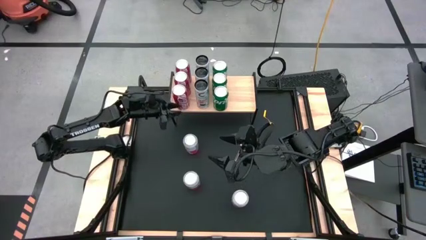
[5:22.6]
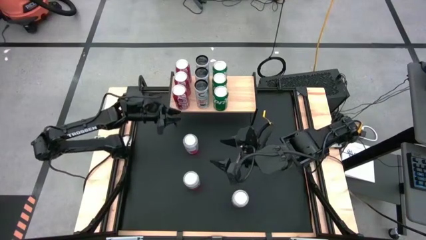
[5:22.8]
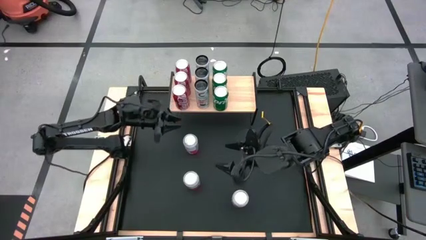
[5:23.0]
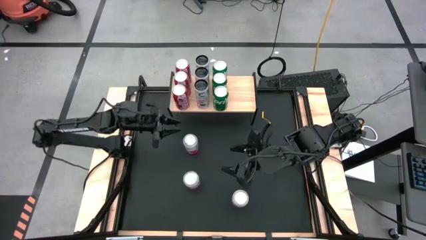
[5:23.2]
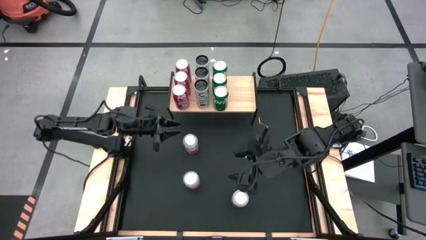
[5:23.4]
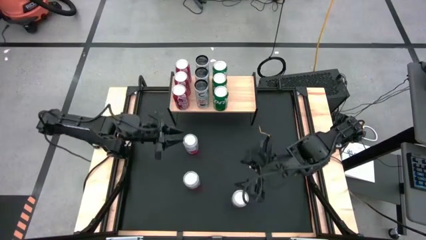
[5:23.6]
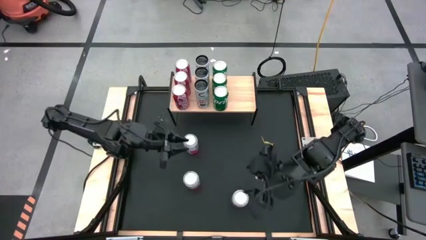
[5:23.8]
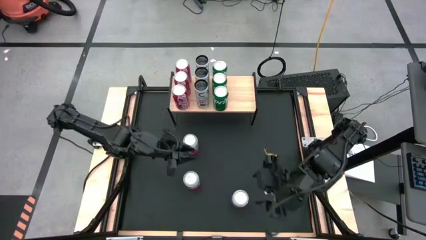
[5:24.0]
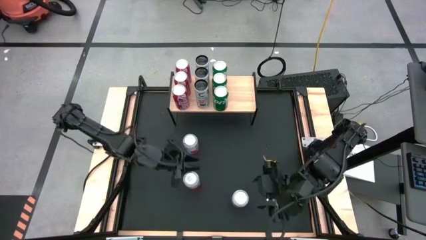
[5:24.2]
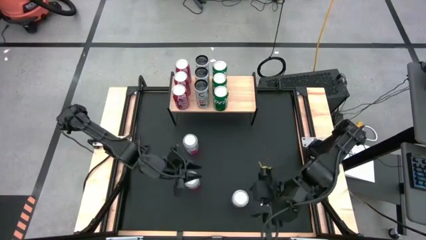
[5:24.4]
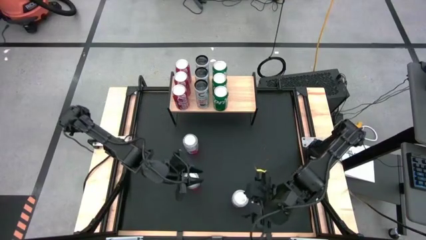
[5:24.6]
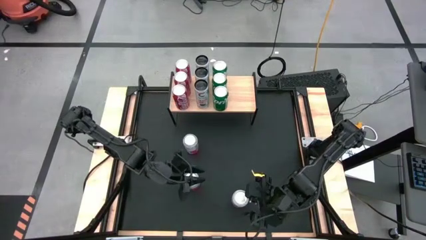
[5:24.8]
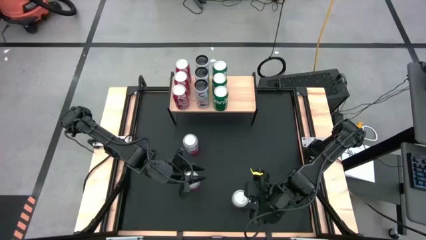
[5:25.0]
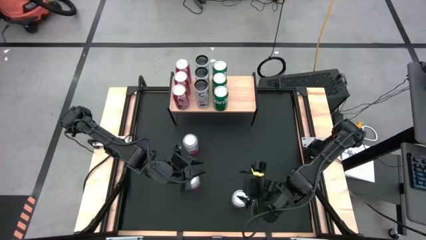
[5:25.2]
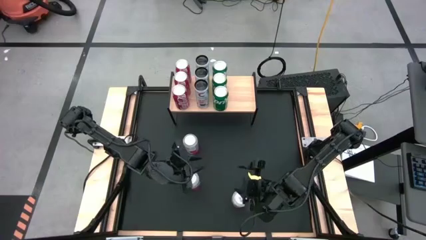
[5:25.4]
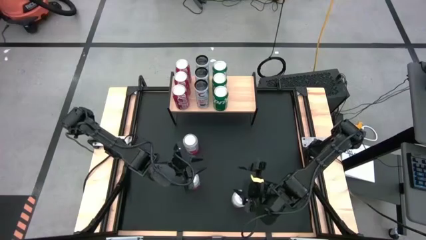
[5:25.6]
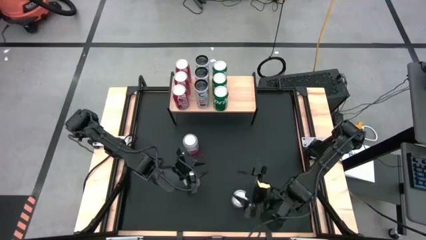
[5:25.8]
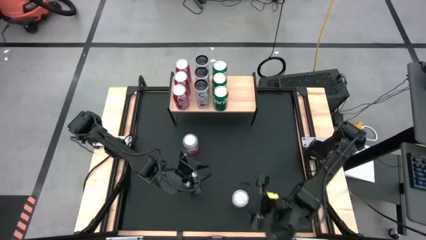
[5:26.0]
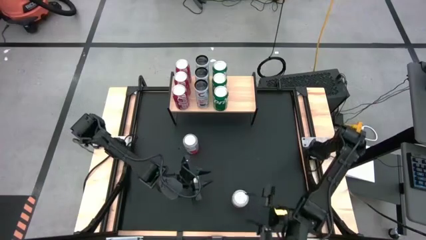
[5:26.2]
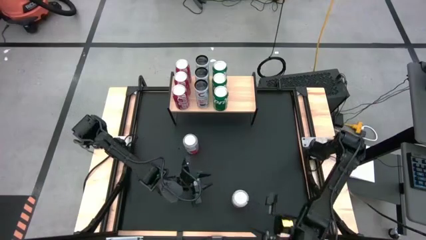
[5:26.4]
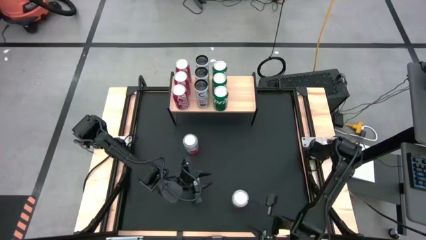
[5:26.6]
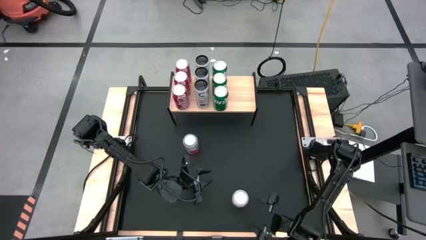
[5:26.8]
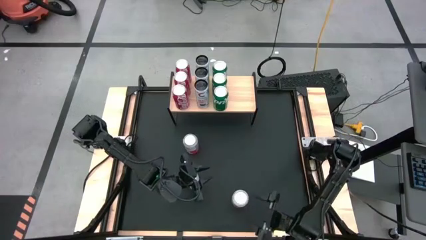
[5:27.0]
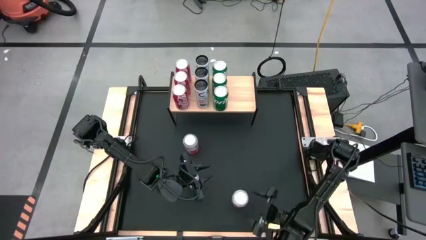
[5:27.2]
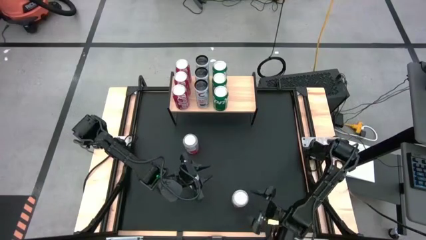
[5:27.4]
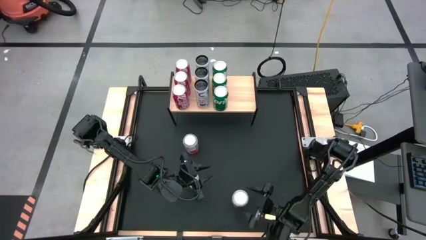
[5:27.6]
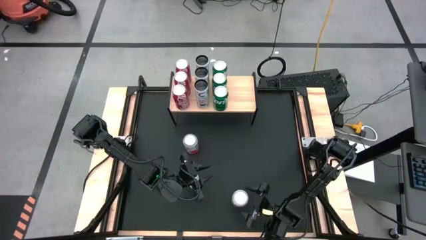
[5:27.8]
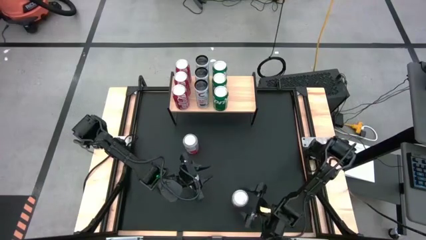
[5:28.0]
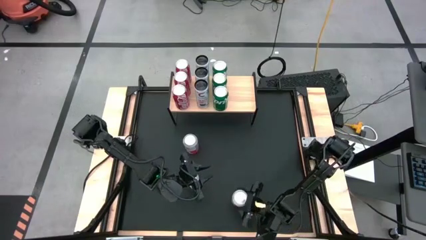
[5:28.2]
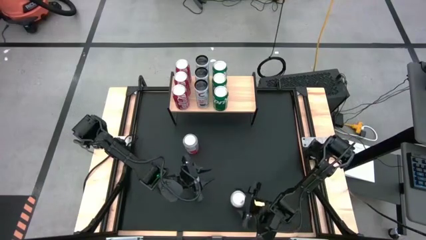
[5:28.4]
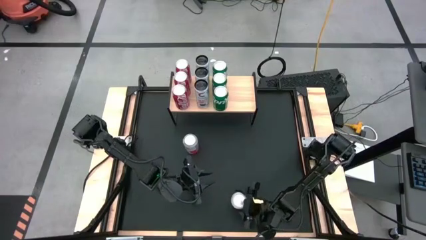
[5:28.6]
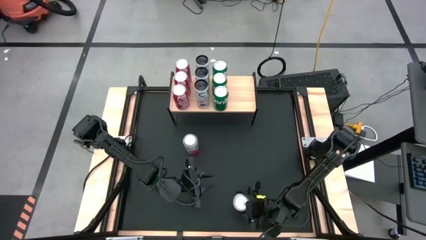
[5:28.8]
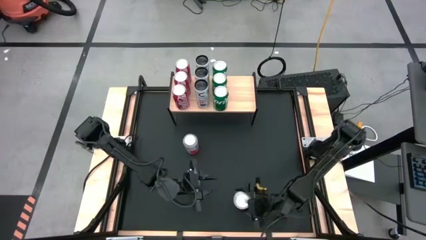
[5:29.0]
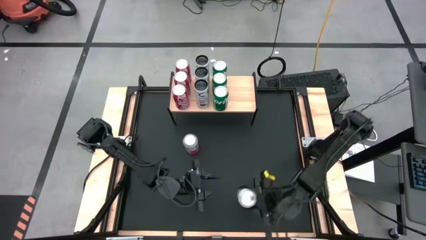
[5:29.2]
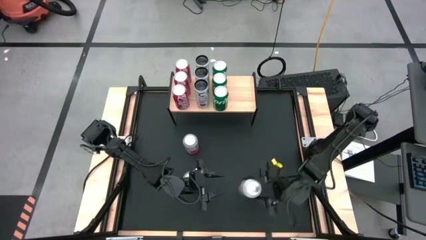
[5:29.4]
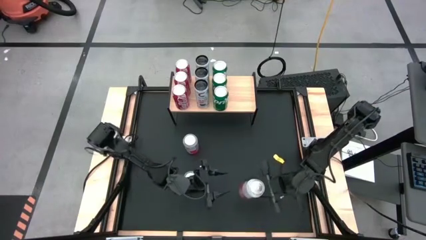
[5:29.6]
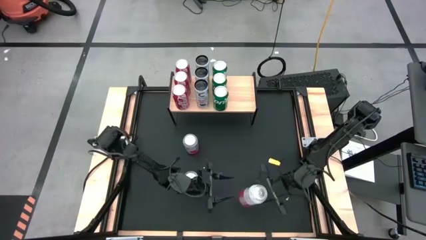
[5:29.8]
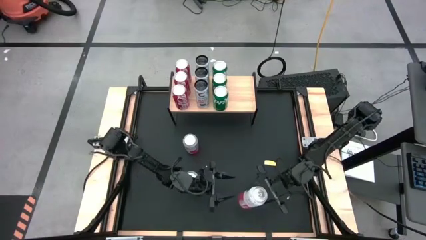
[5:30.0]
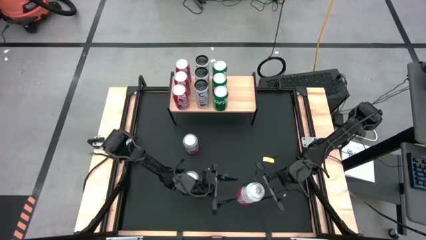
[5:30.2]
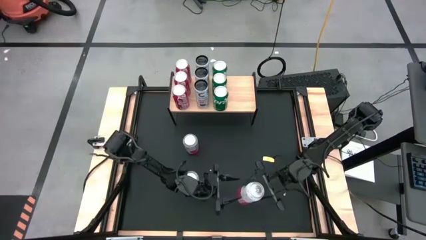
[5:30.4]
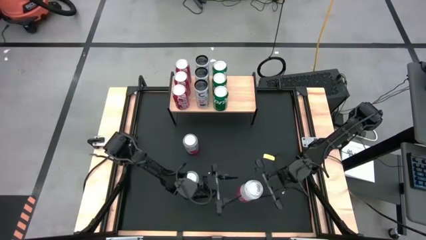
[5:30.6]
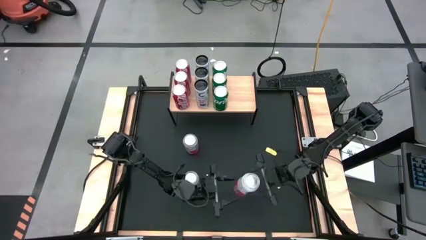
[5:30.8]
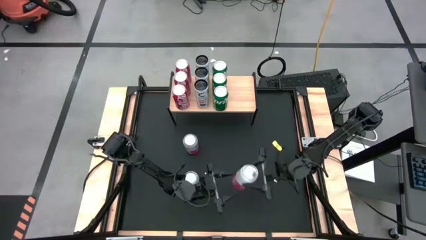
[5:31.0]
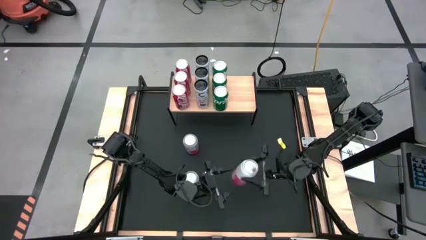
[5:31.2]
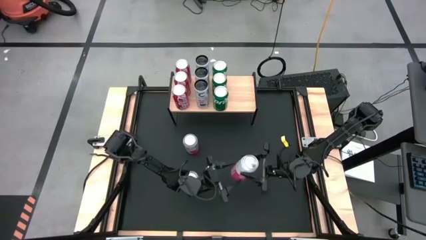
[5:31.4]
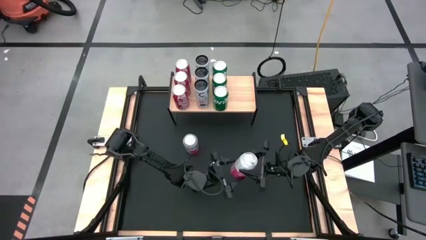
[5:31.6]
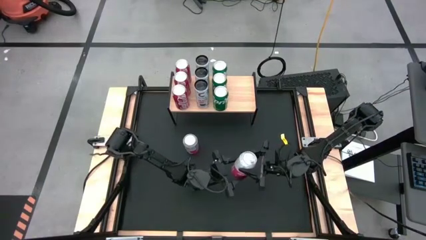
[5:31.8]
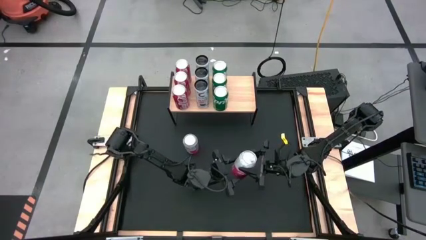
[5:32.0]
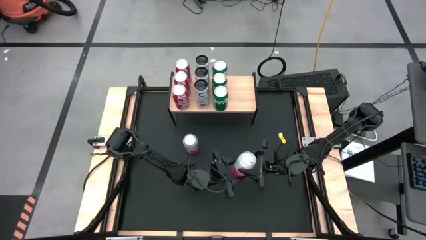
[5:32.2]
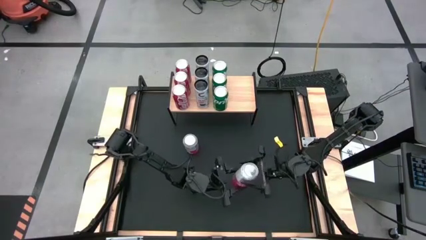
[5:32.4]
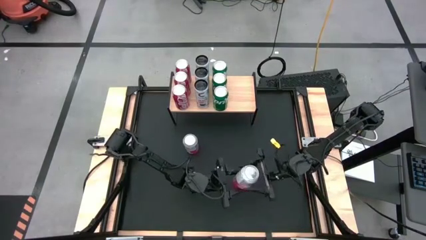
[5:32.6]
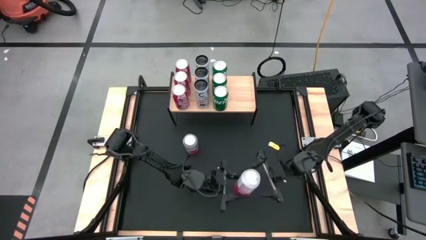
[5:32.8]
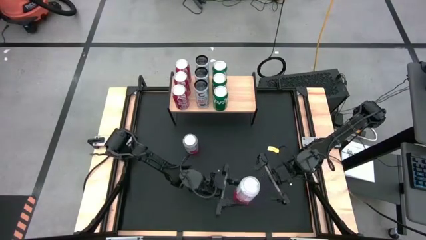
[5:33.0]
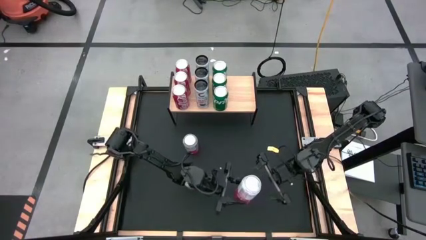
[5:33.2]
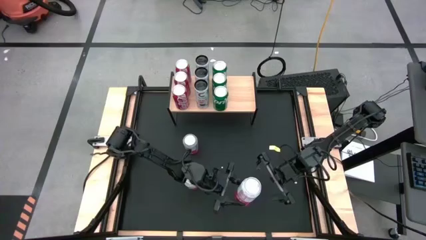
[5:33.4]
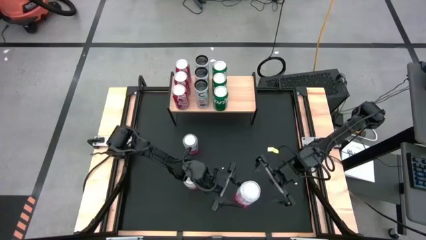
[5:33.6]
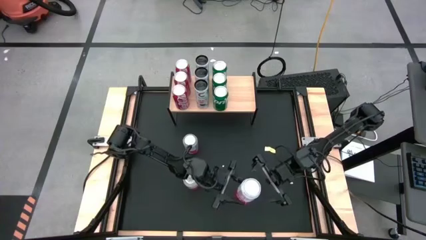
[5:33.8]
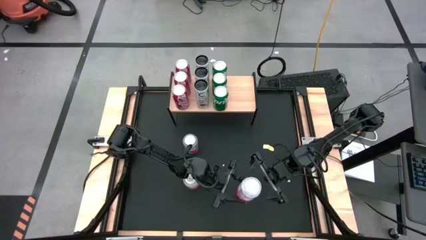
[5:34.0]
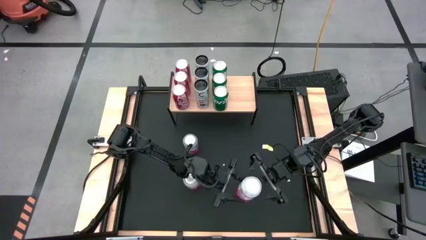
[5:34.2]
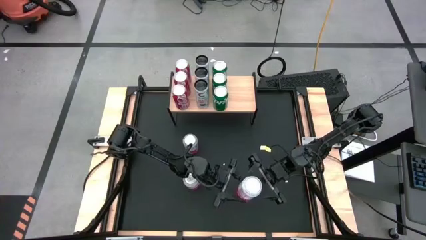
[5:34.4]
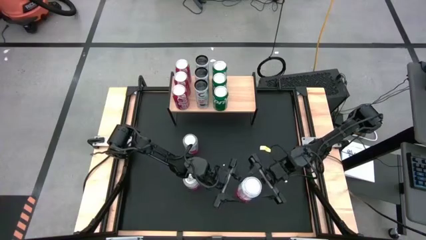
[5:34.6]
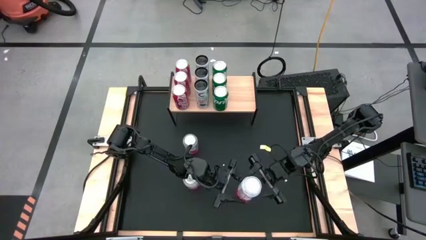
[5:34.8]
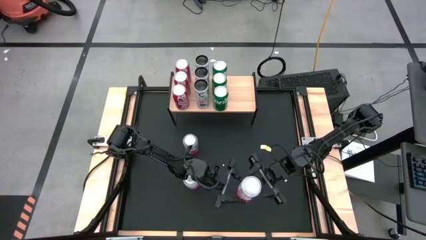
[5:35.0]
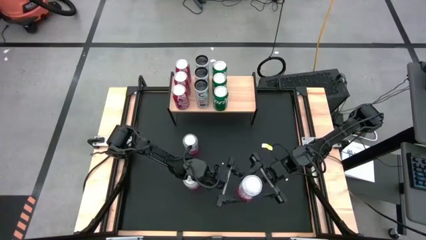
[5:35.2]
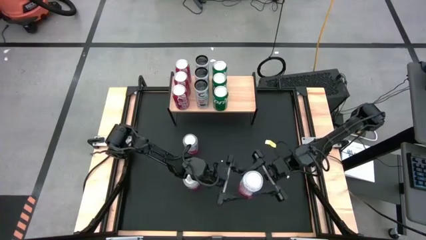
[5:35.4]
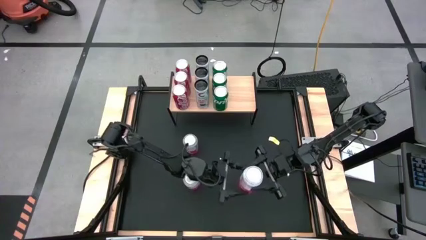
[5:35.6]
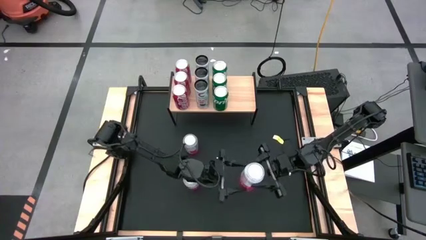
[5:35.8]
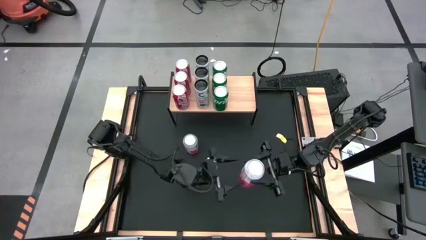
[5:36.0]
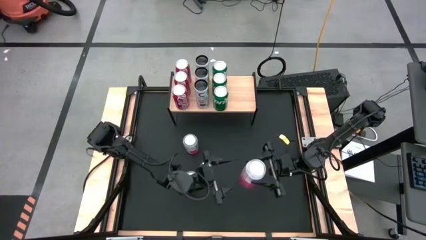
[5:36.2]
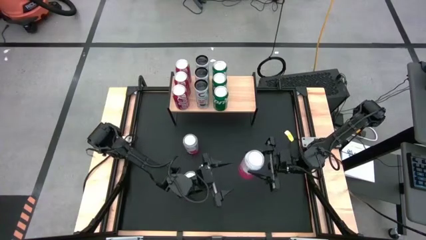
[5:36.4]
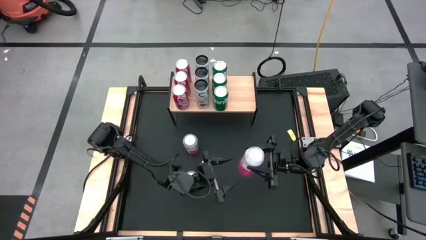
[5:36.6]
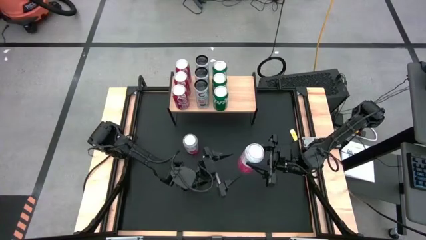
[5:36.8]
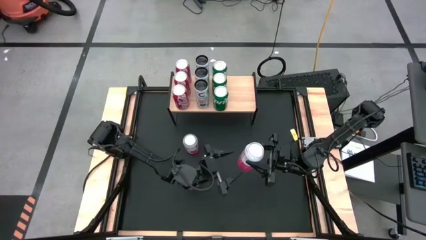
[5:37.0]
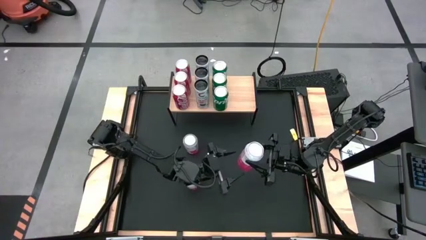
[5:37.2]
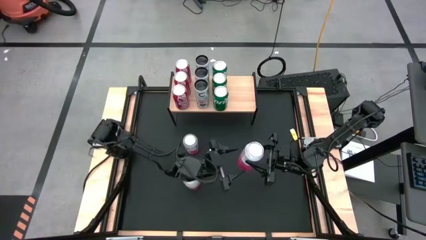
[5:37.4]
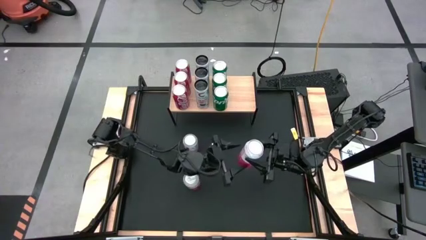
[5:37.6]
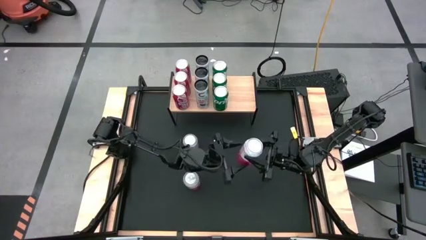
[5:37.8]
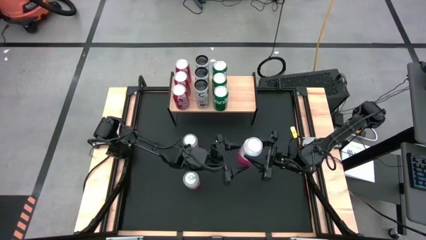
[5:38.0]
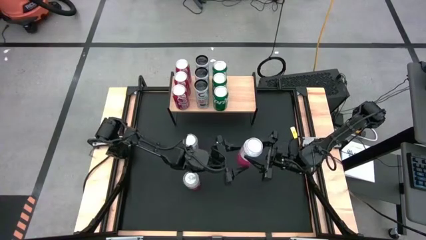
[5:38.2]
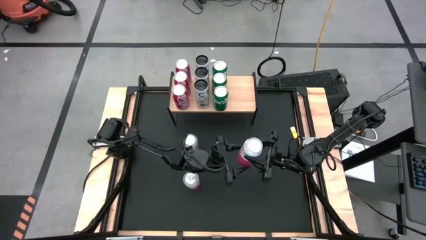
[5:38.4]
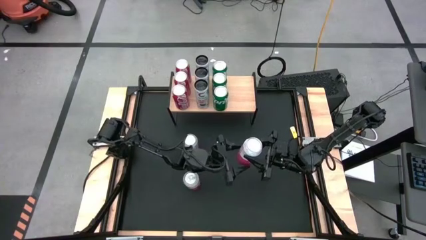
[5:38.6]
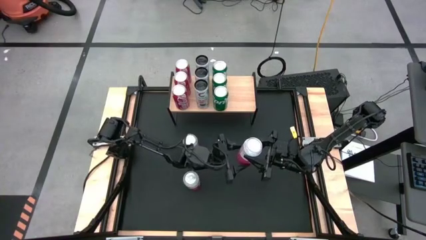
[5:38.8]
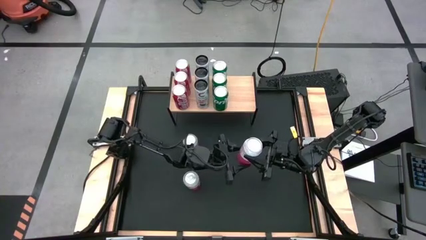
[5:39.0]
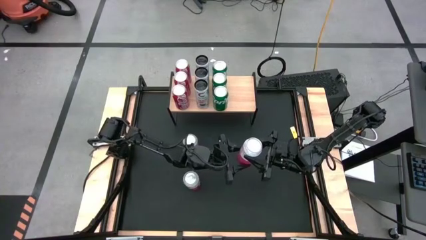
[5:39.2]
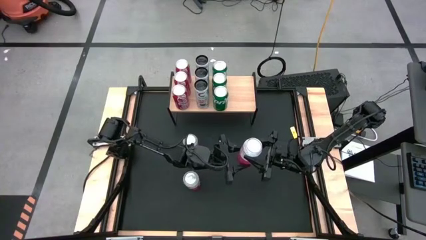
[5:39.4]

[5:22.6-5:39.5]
Task: Place canned beverage on shelf
Put the bottom right pink soda can on the shelf
